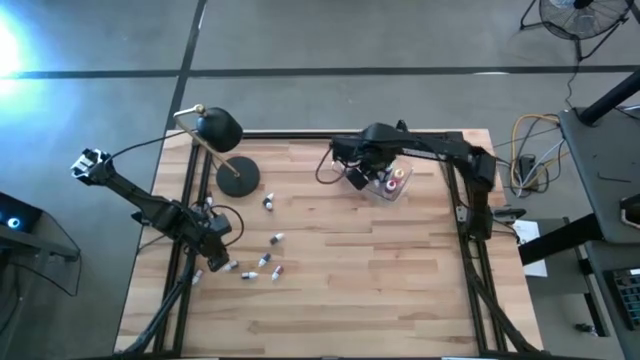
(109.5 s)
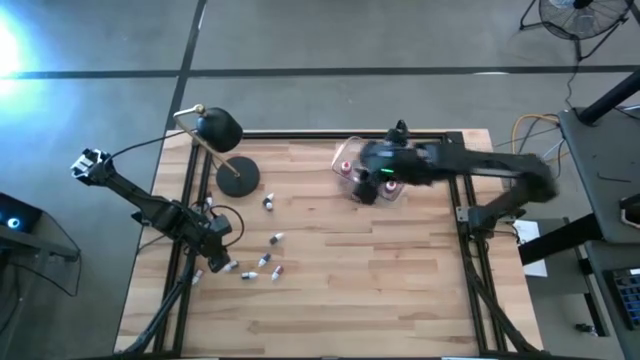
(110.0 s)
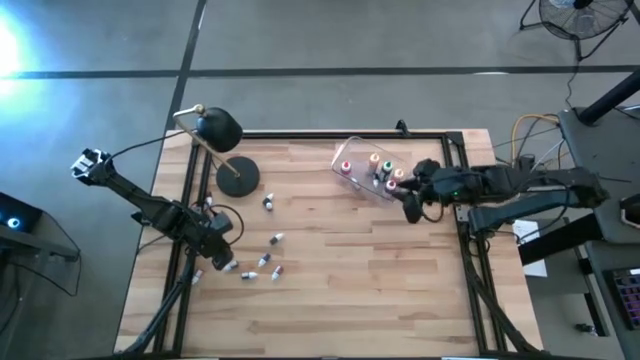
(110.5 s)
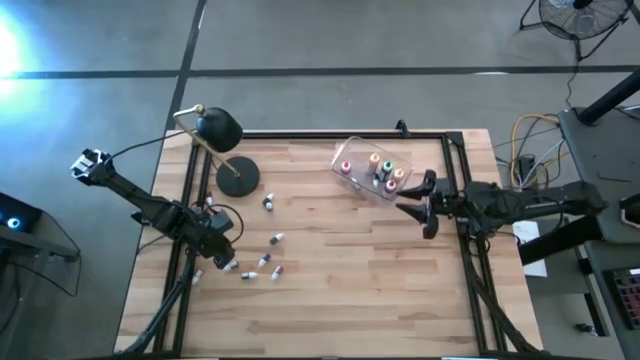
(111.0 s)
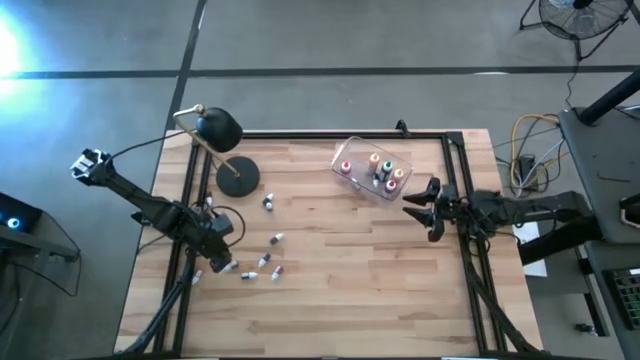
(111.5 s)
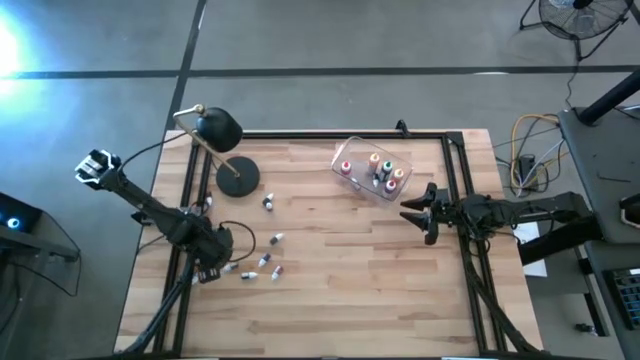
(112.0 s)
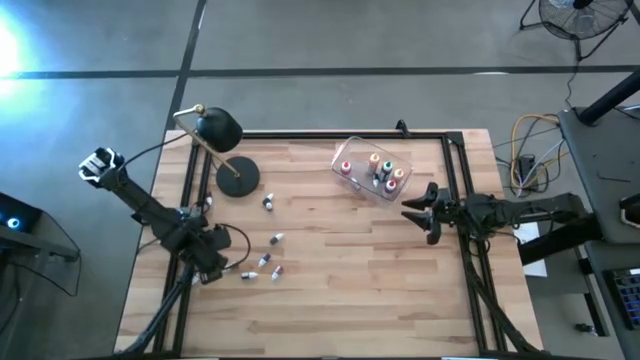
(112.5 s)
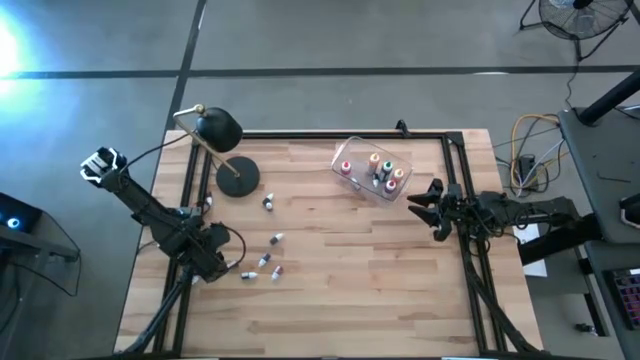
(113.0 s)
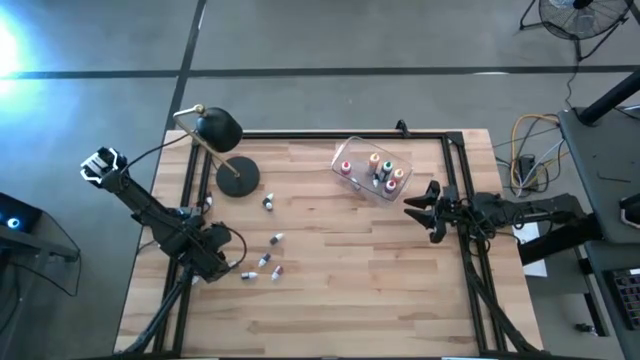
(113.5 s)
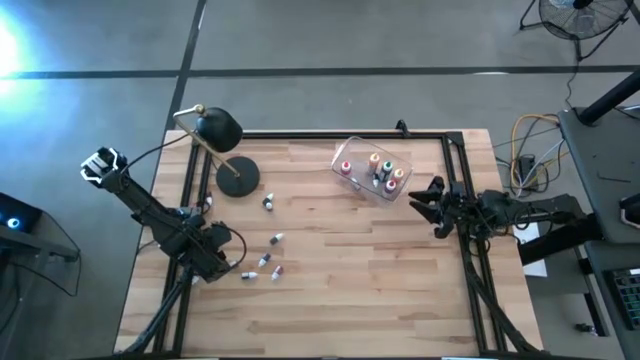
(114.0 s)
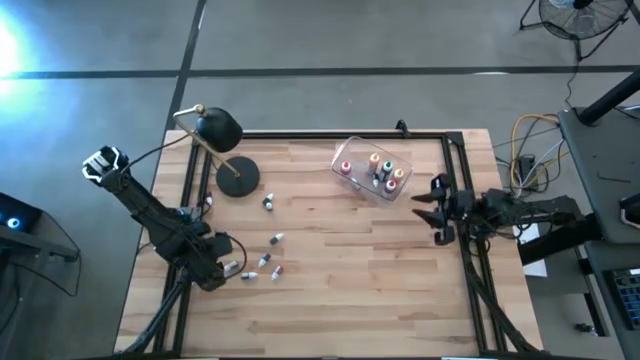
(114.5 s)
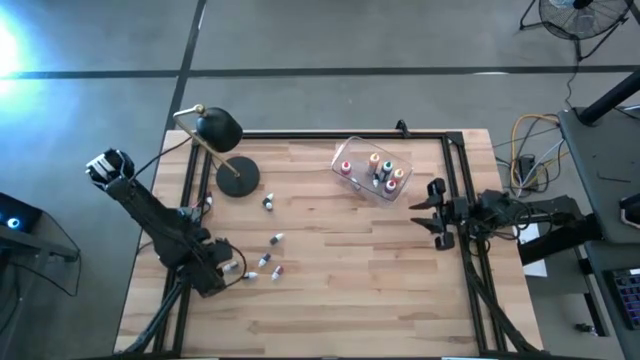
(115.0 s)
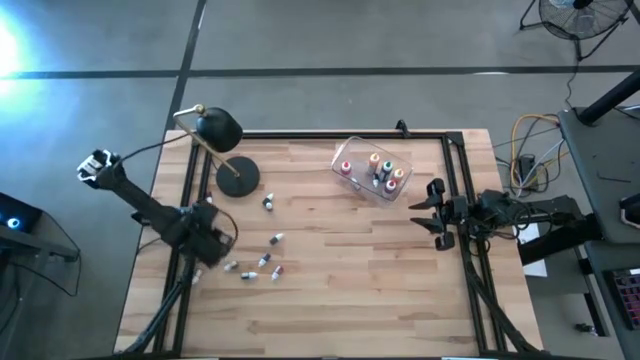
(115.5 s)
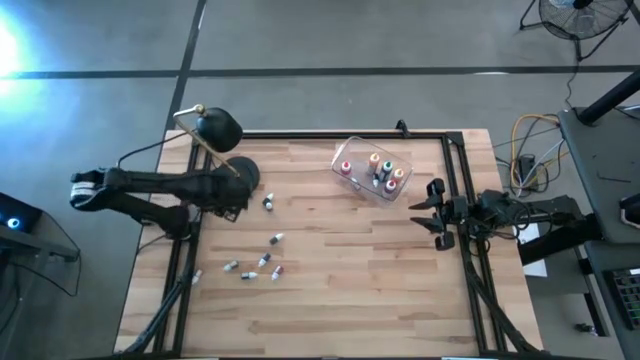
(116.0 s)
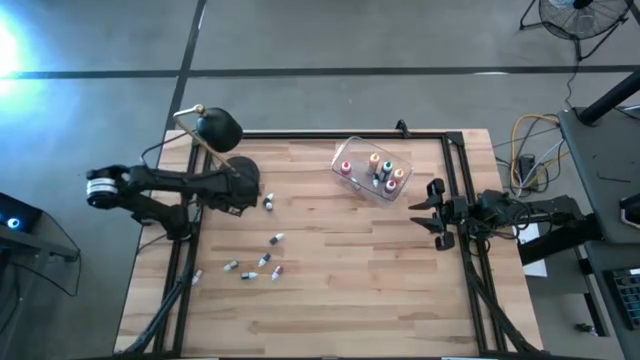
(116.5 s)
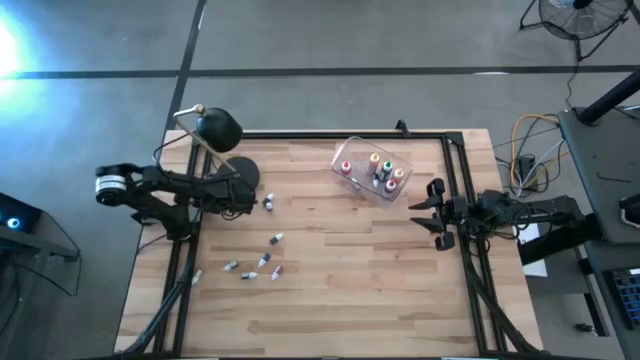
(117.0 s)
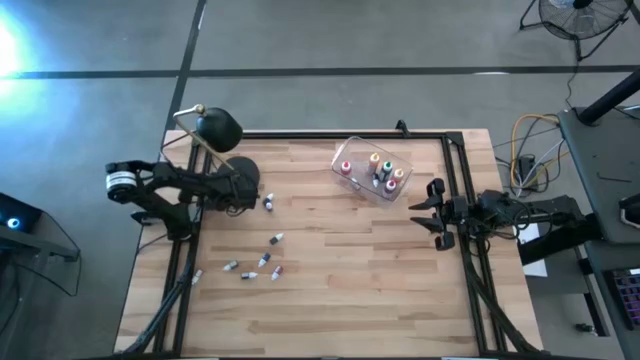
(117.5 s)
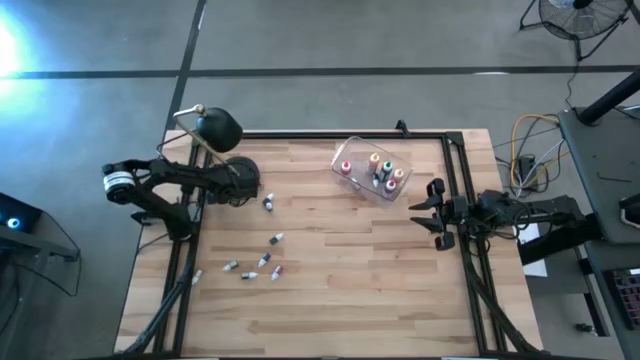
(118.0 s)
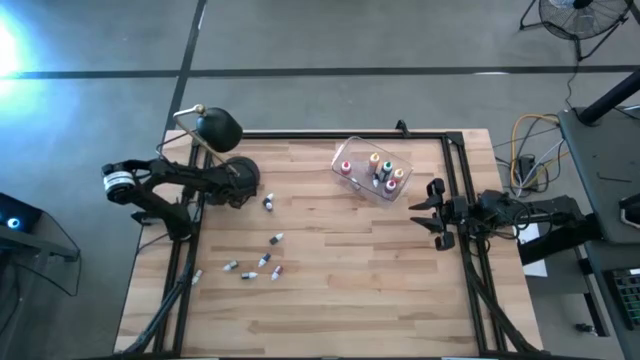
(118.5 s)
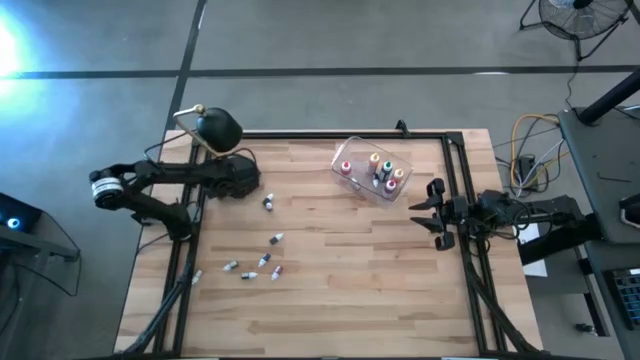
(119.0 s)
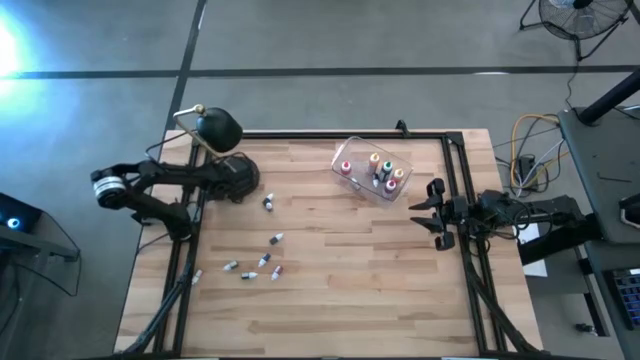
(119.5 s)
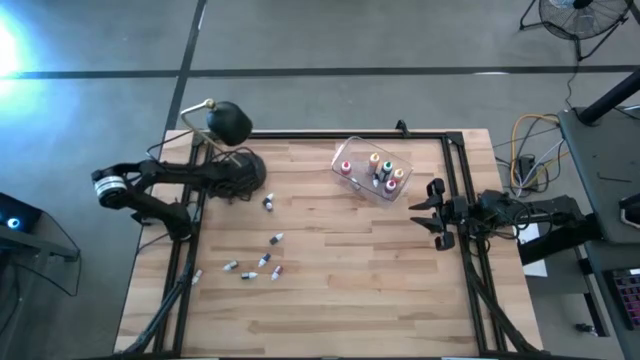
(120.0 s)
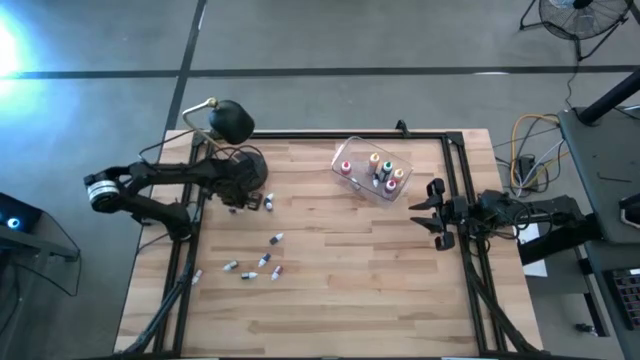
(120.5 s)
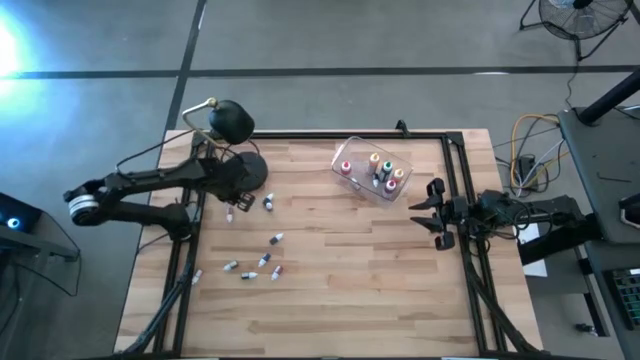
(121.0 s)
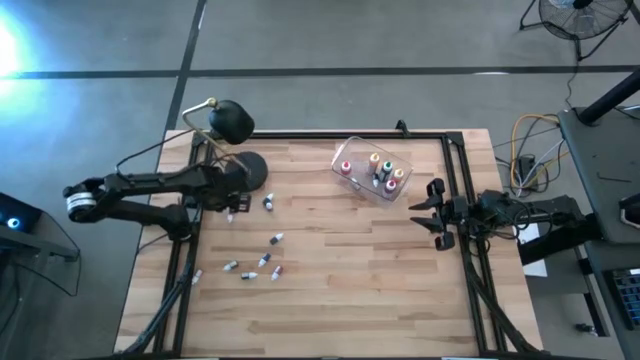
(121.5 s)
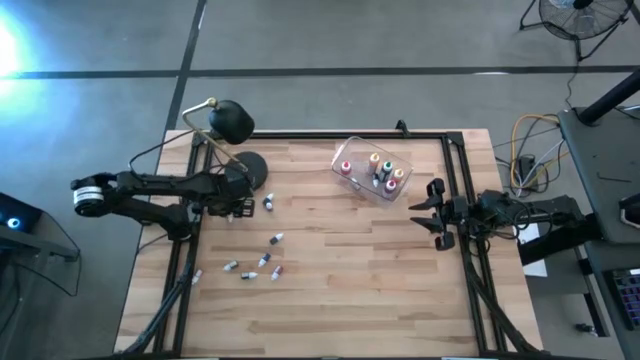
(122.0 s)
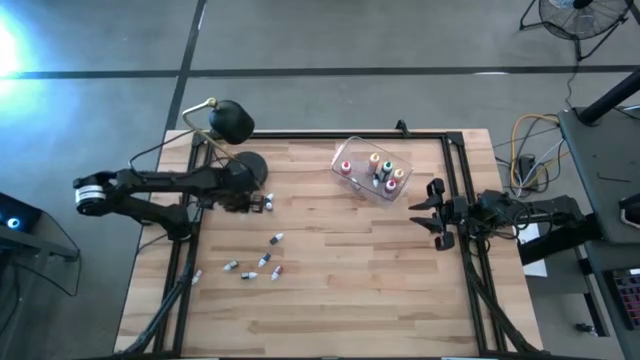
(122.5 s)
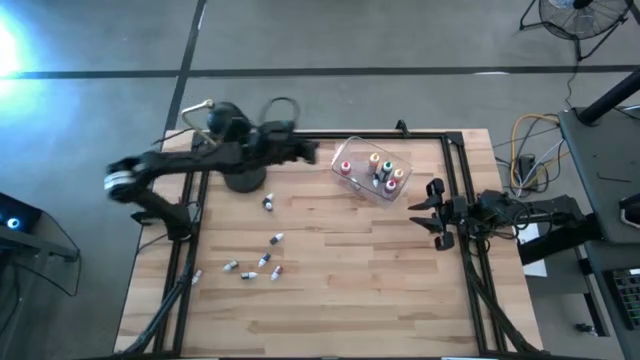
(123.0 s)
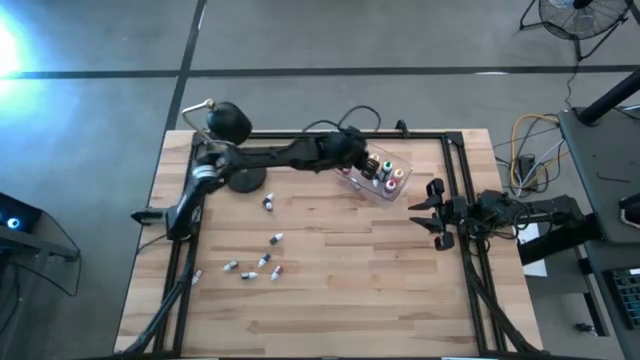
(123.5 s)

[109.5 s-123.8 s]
Task: Pick & Place food coloring
Put the small orange food coloring bottle into the transparent bin

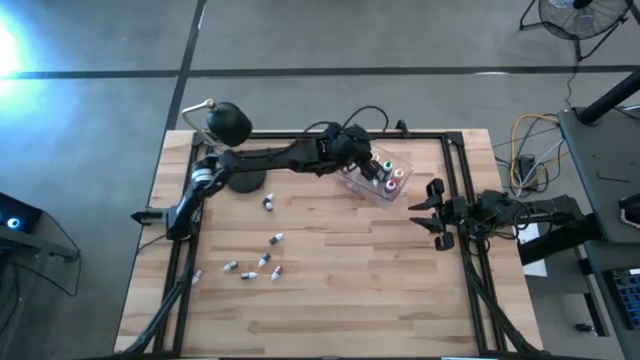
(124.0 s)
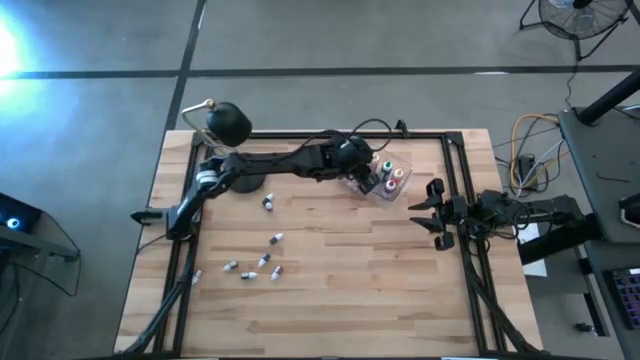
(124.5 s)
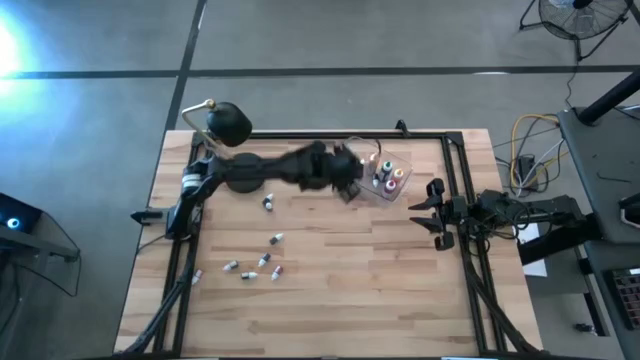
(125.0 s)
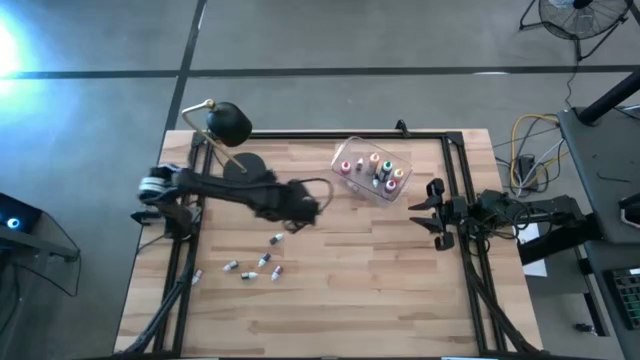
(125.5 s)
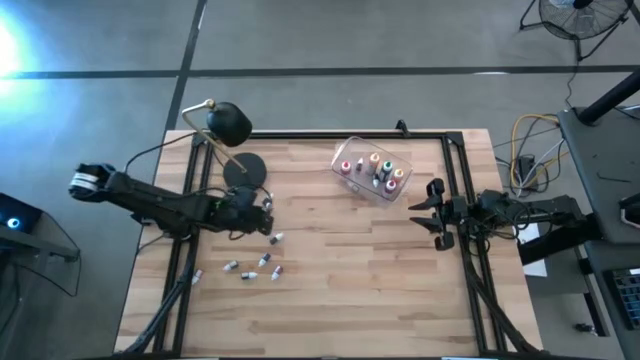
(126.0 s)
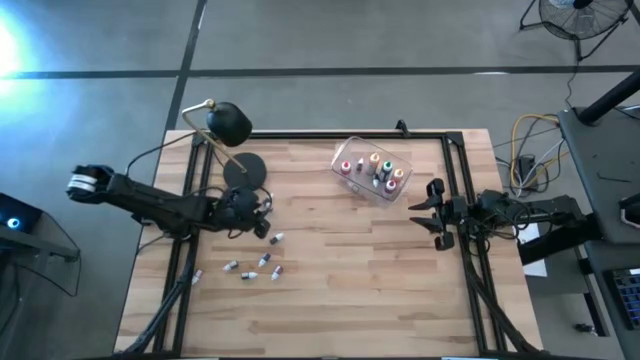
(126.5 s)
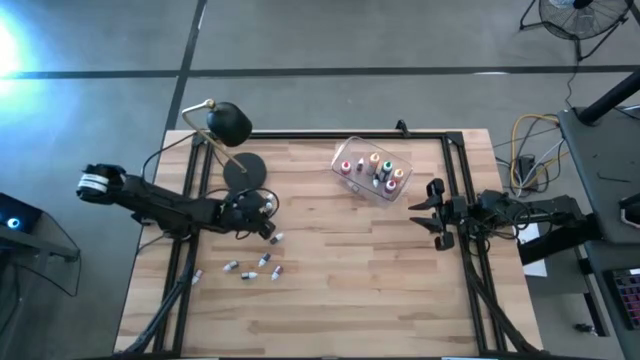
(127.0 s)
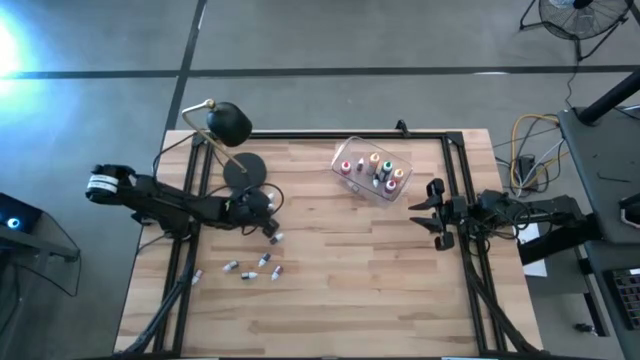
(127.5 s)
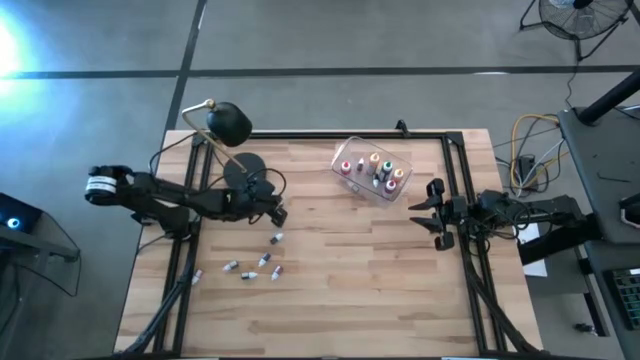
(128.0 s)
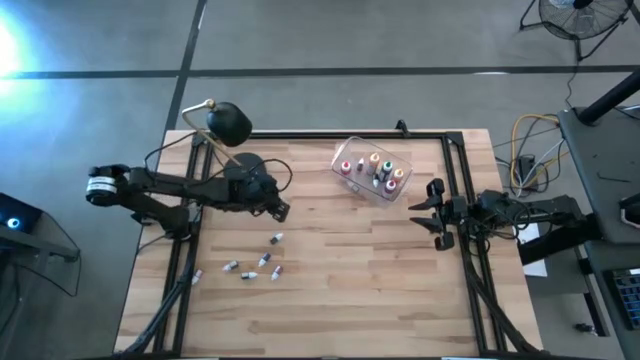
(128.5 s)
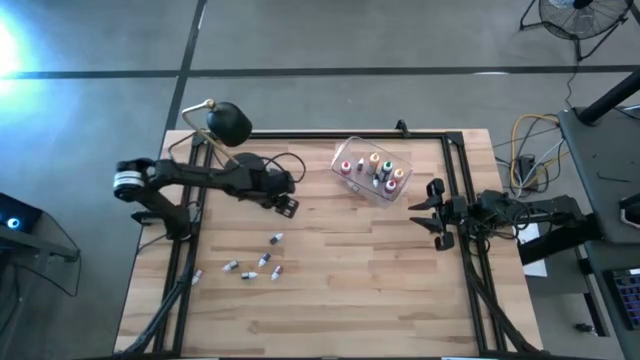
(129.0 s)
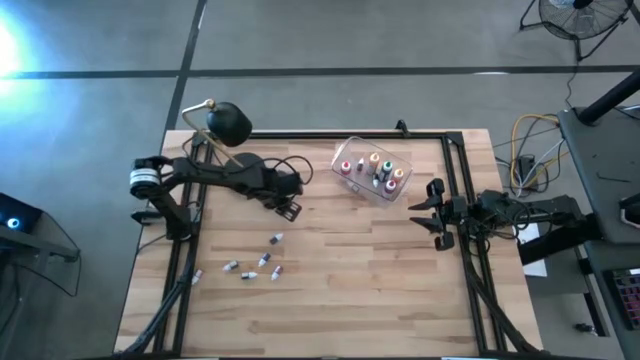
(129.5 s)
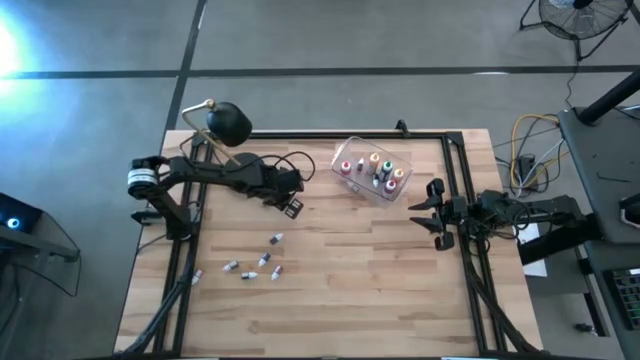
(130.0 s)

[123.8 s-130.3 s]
Put the small purple food coloring bottle into the transparent bin

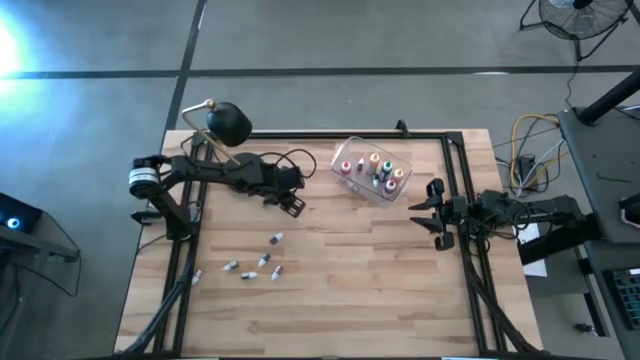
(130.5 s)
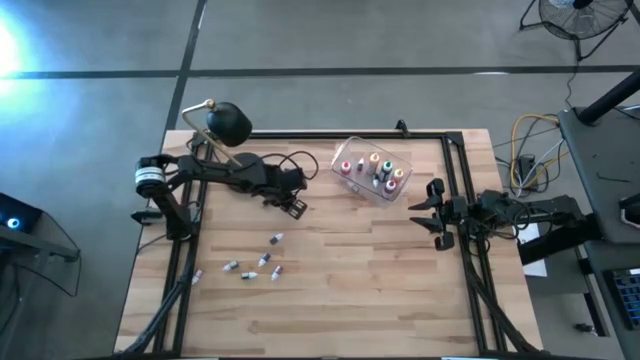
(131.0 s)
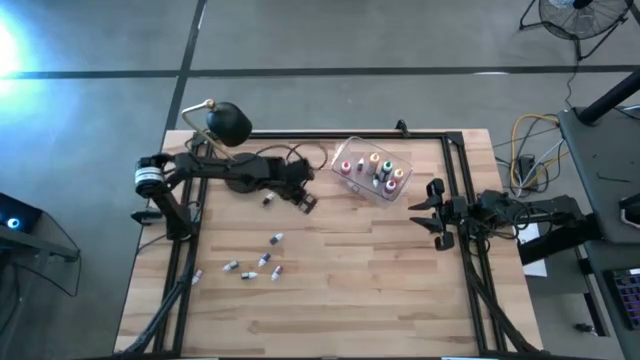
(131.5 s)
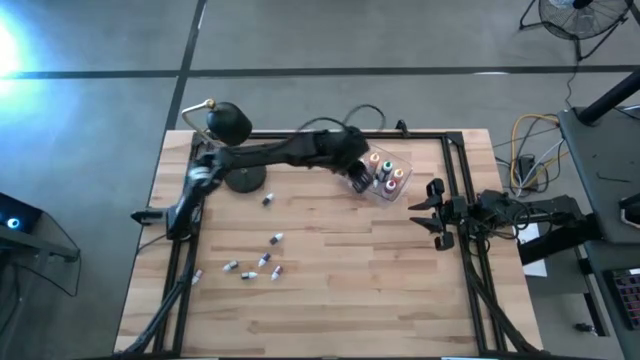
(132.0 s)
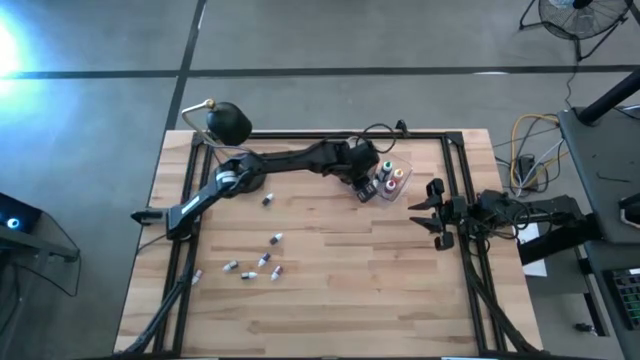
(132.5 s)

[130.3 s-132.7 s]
Put the small purple food coloring bottle into the transparent bin
